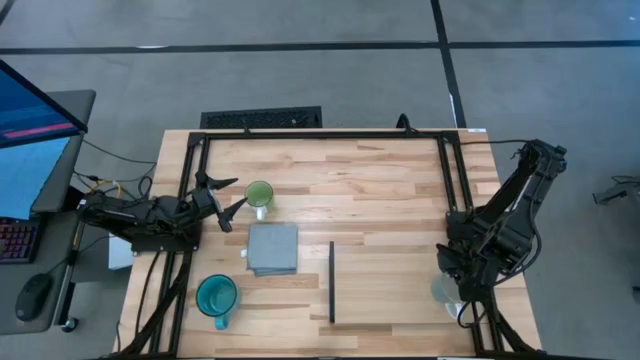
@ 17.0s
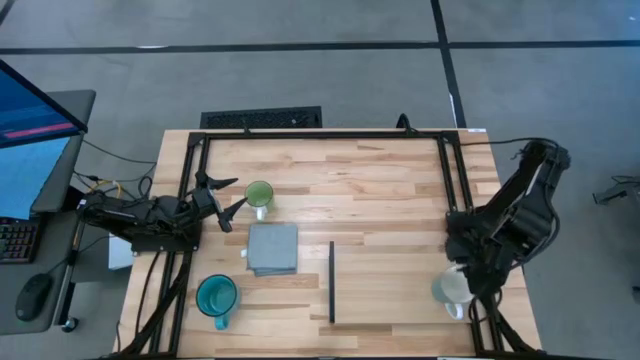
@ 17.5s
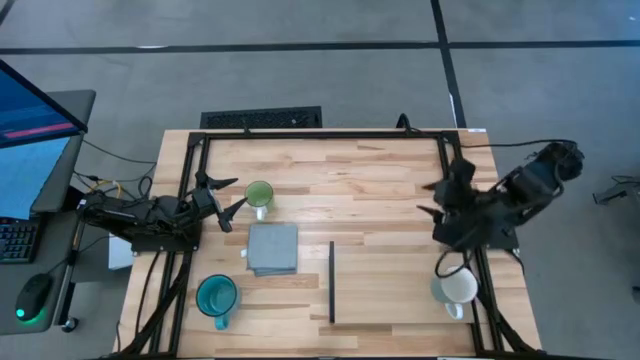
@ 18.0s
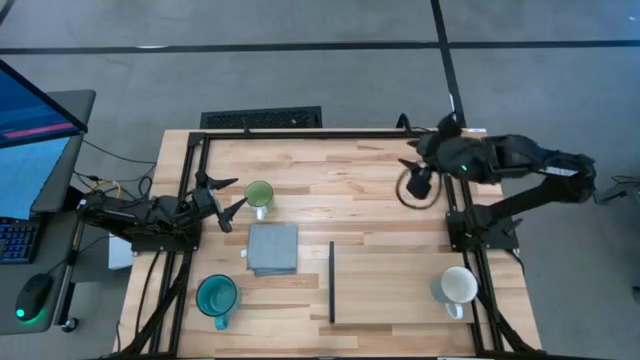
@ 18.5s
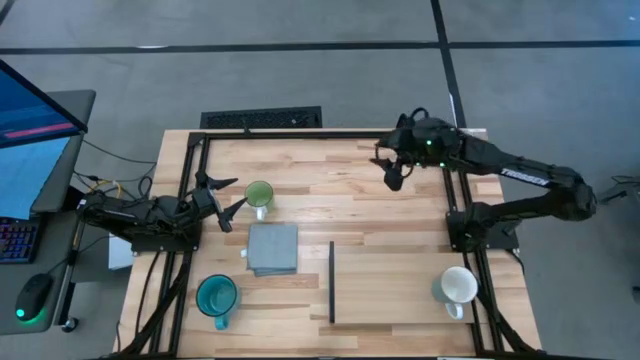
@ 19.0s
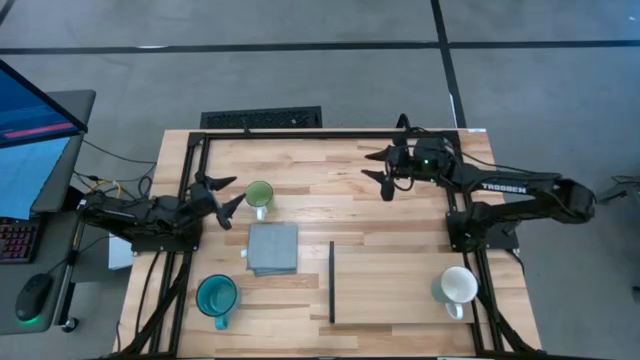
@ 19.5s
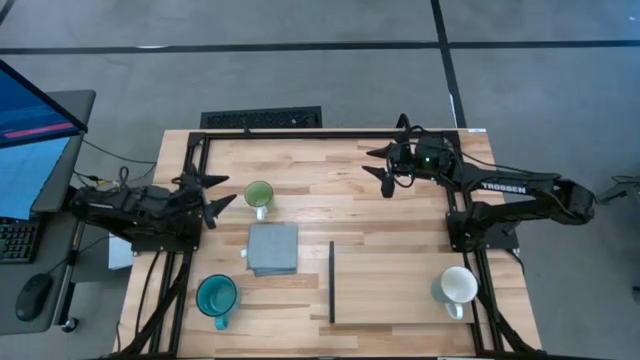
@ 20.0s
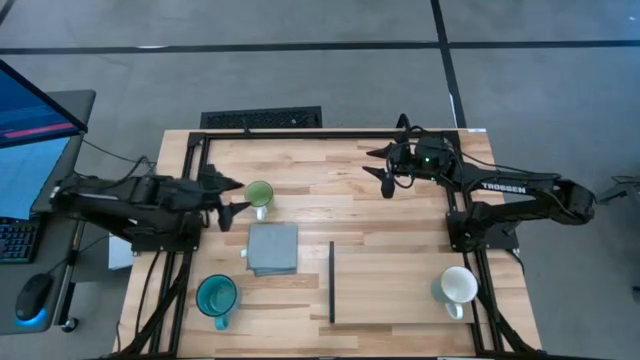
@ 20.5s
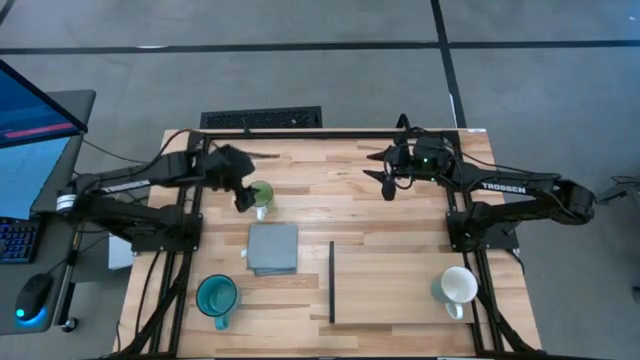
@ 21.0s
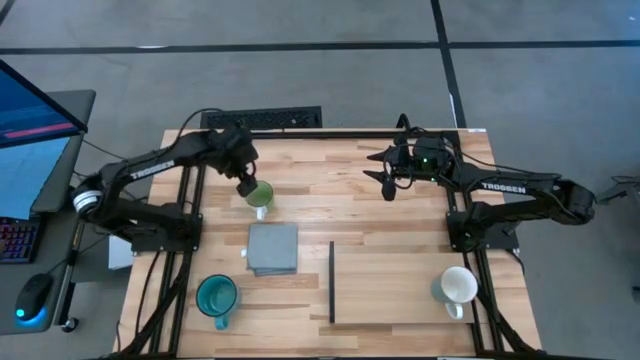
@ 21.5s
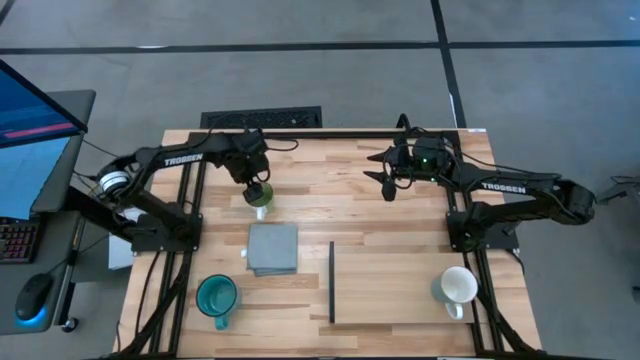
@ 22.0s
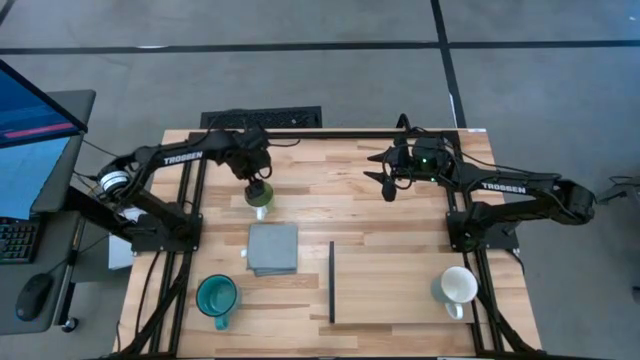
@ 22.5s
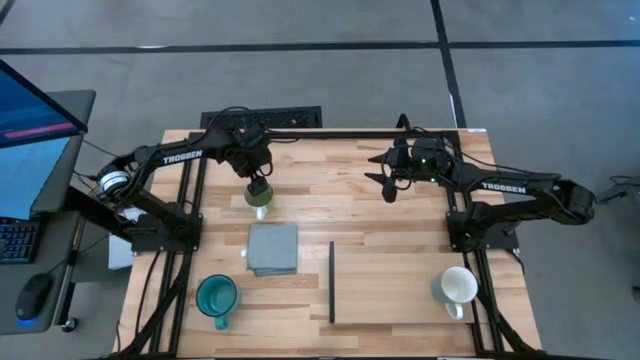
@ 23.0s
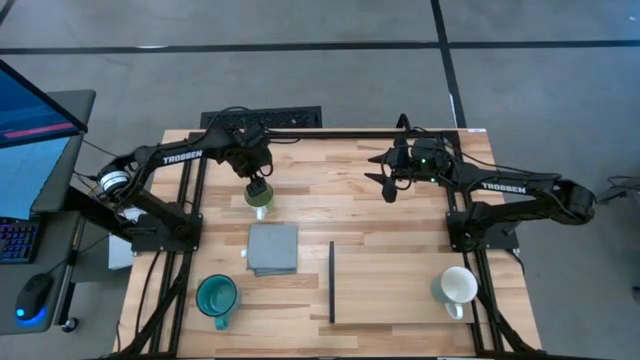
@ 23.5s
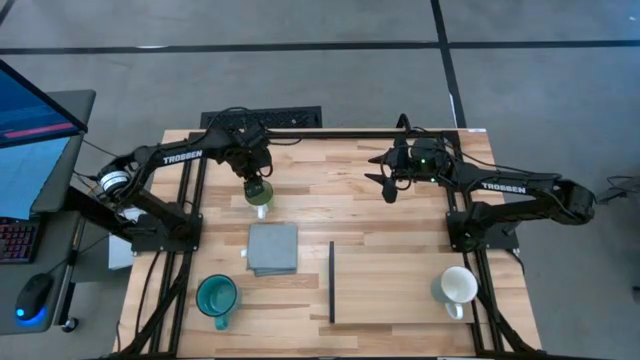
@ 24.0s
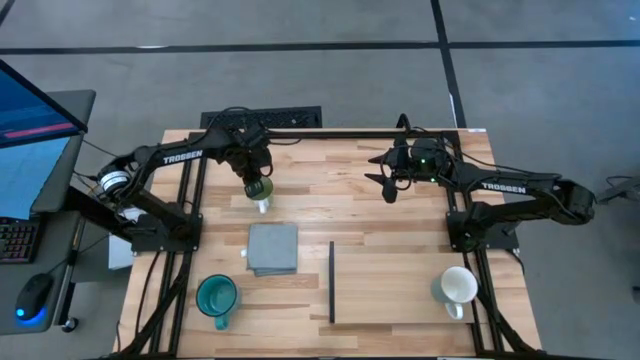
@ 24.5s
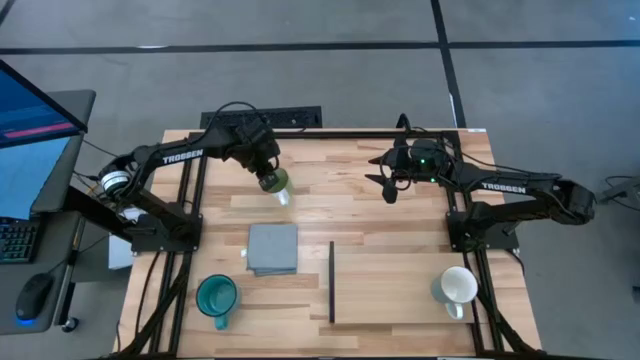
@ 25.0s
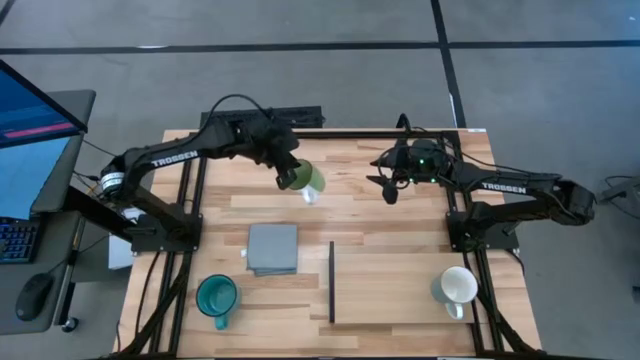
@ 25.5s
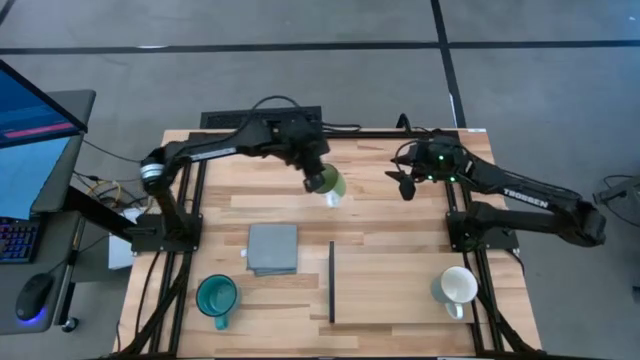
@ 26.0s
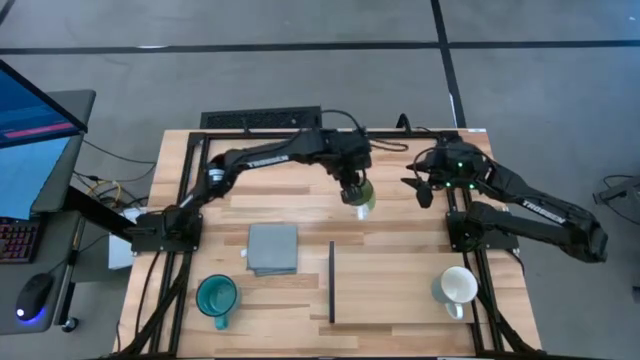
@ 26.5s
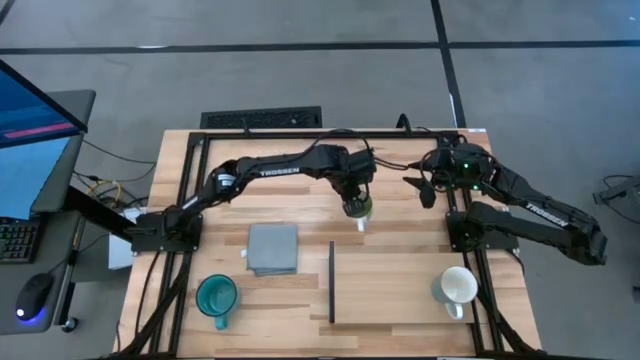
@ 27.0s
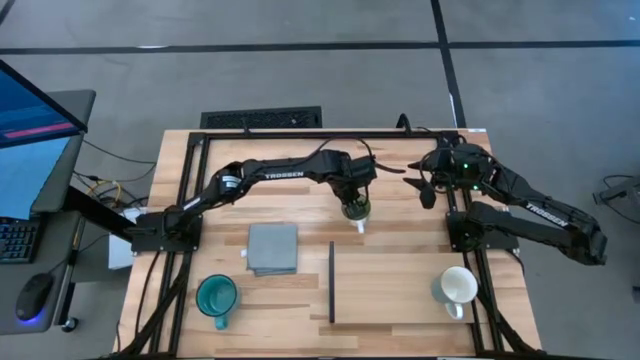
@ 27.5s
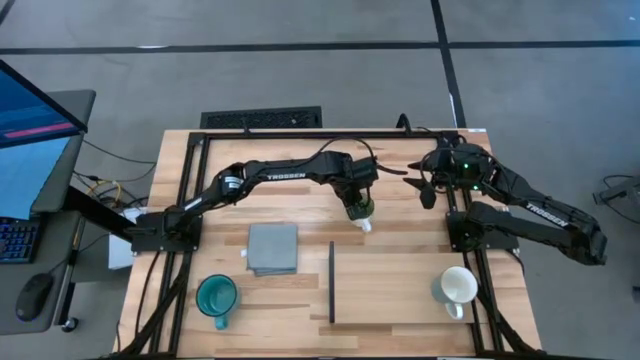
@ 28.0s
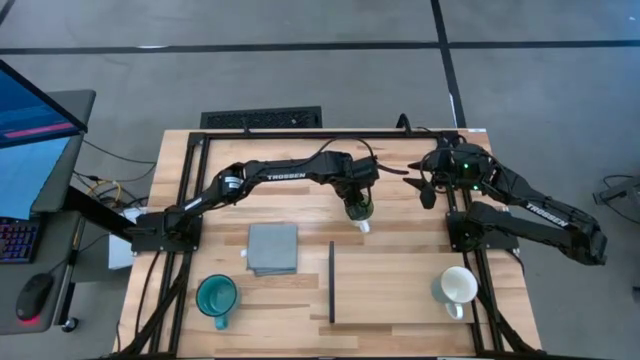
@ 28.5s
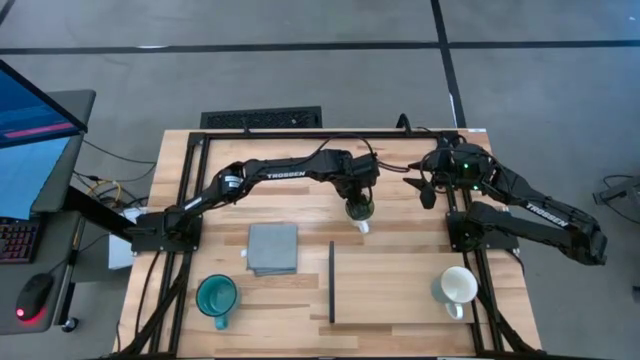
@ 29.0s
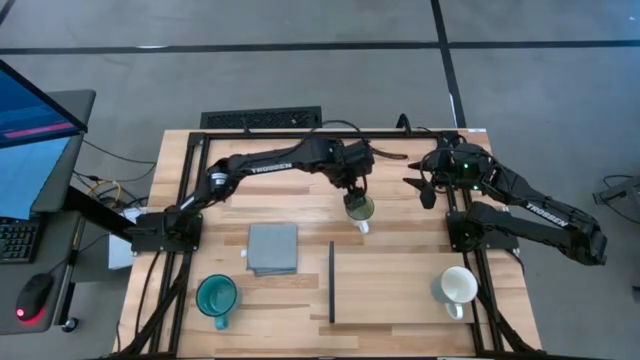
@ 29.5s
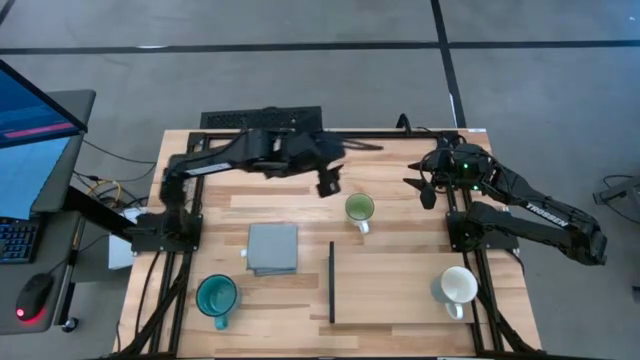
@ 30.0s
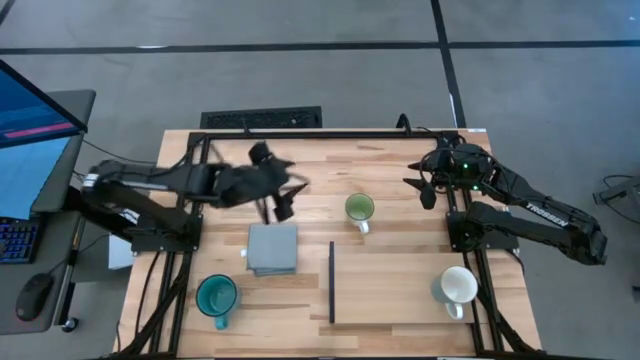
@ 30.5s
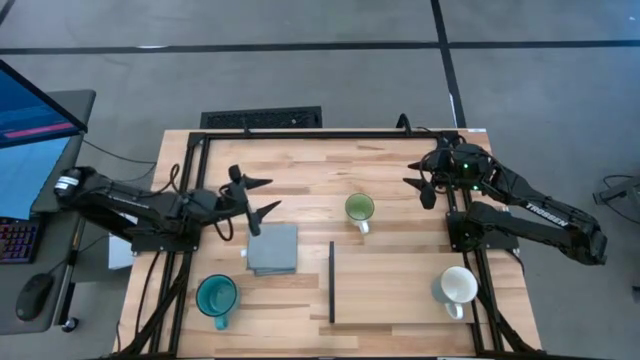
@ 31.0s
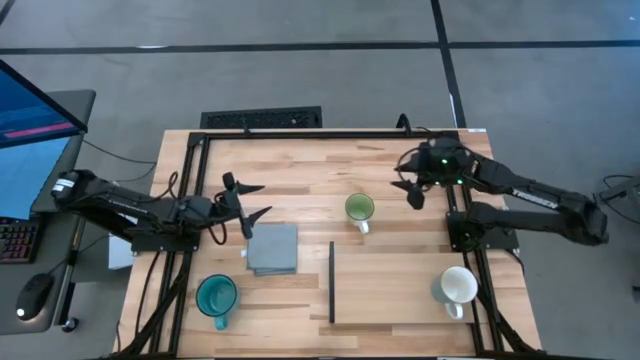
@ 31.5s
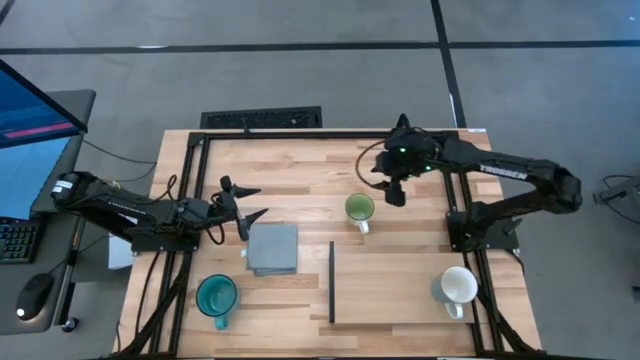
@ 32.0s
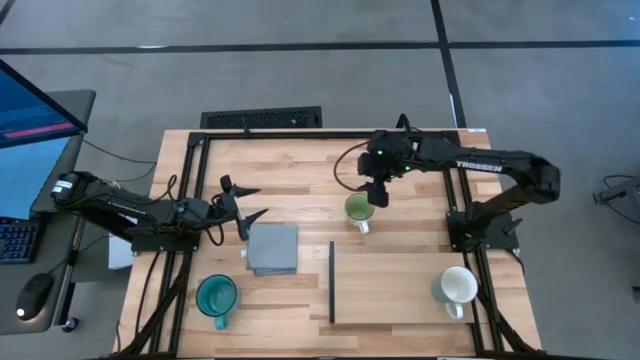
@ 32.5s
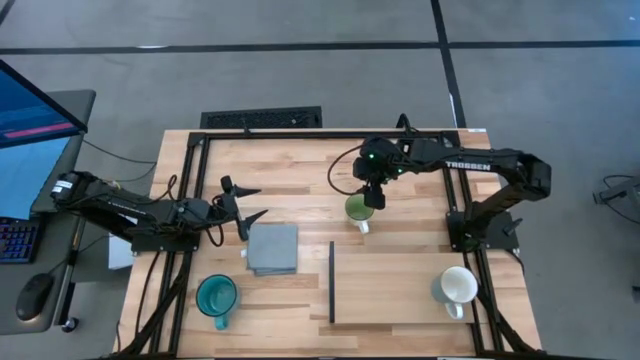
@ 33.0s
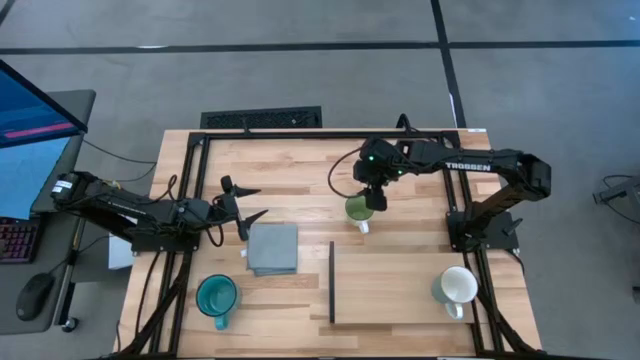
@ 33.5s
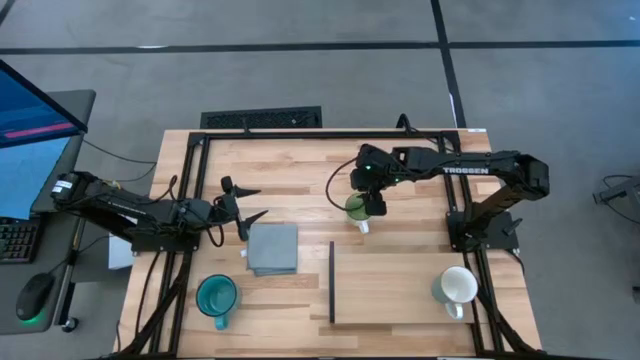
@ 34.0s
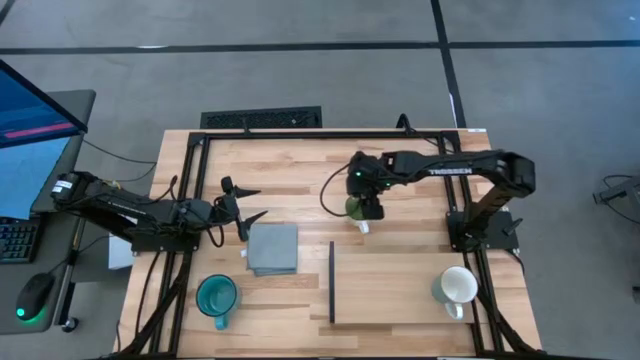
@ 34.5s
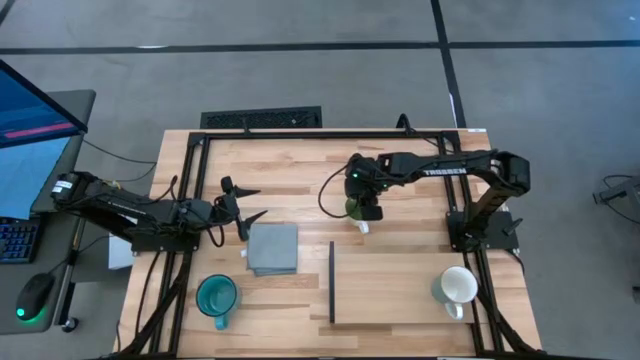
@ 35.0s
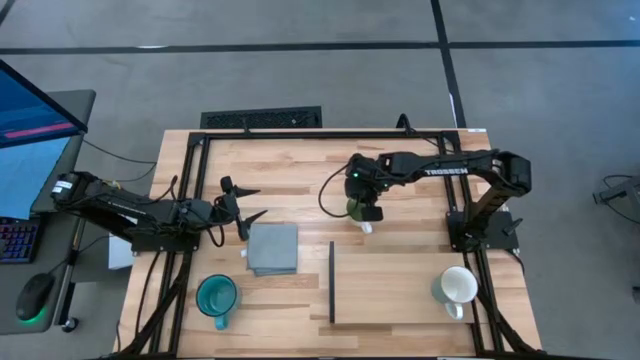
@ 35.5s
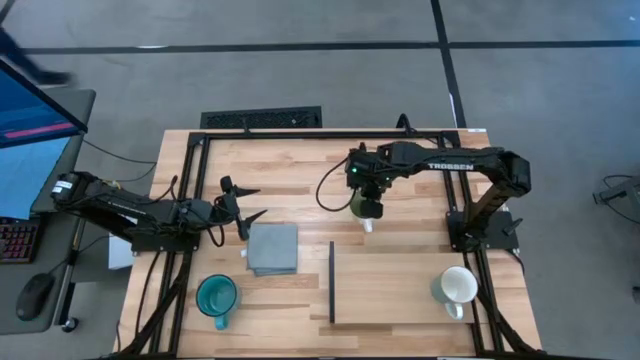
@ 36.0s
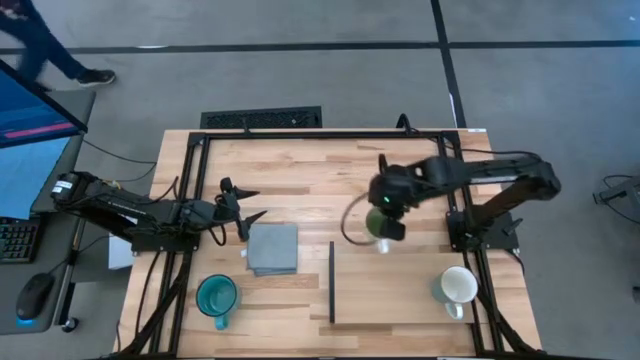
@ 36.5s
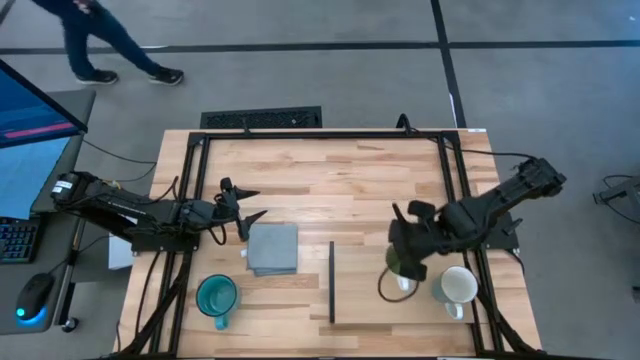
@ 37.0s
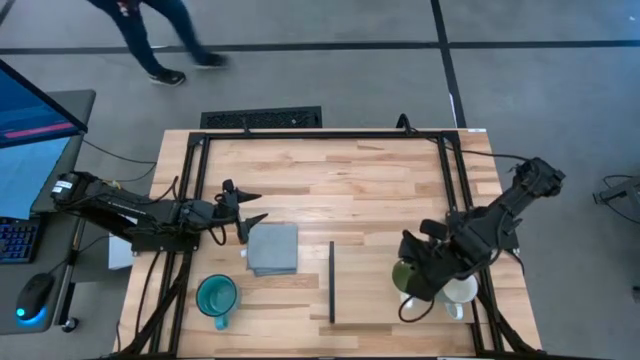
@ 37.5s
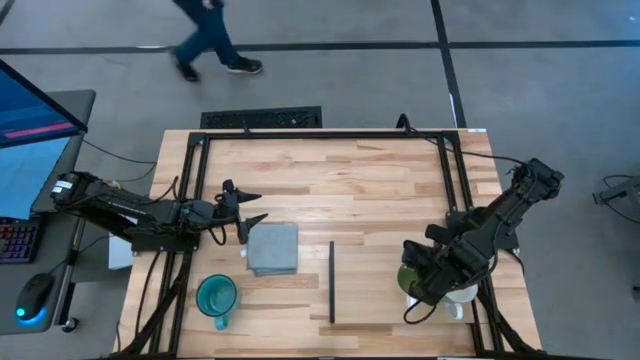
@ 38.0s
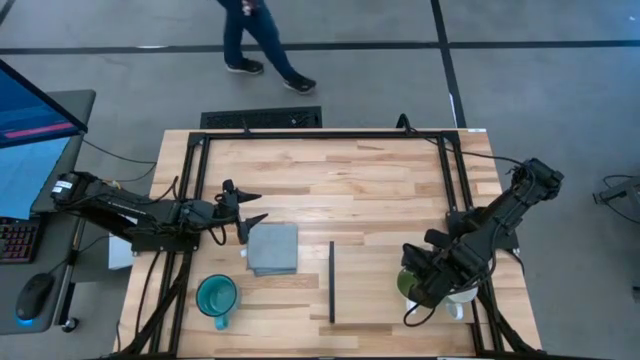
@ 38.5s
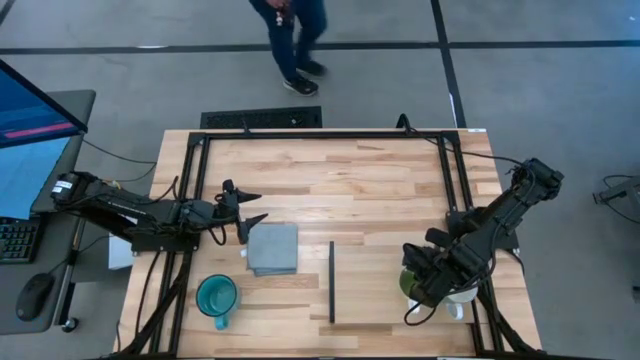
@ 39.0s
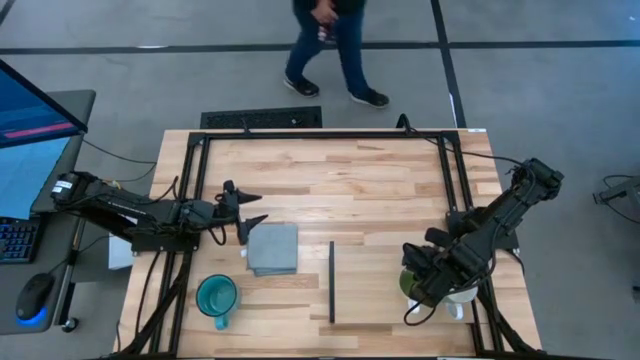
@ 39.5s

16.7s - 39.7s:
Task: Stack small to large cups/mugs on shelf
Put the green mug on the shelf
